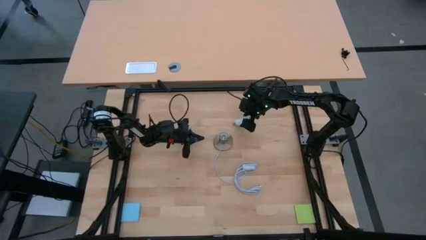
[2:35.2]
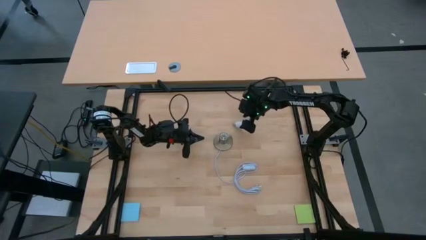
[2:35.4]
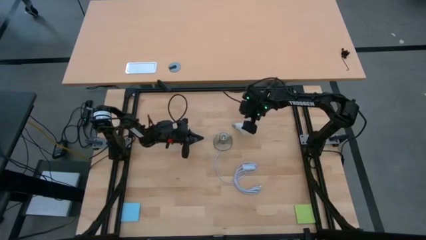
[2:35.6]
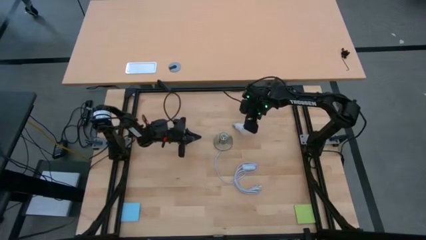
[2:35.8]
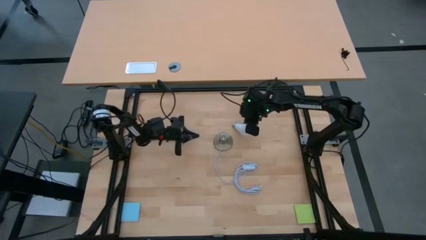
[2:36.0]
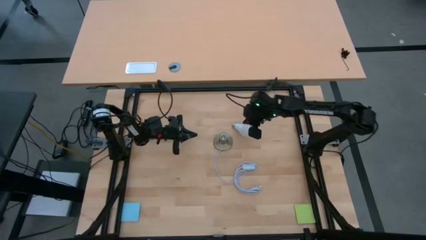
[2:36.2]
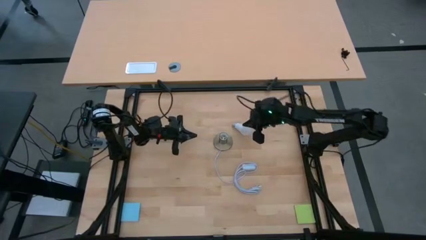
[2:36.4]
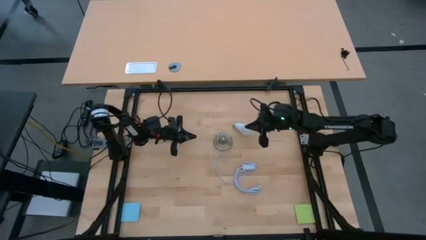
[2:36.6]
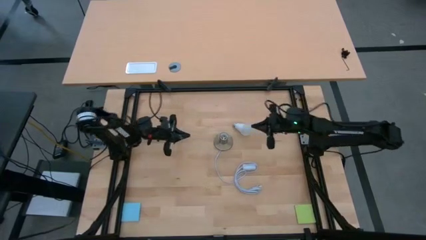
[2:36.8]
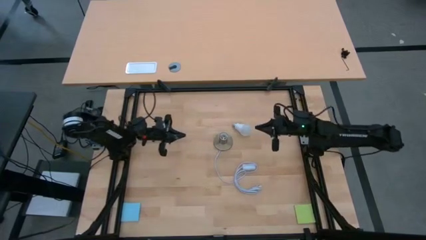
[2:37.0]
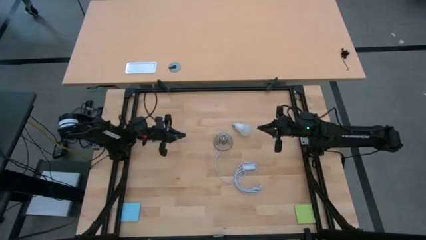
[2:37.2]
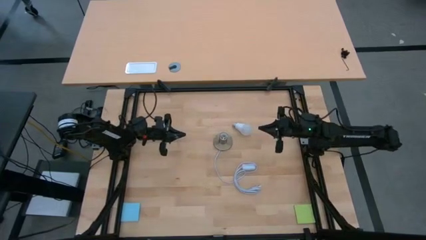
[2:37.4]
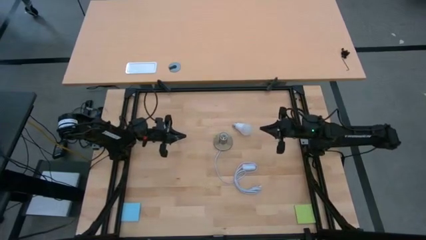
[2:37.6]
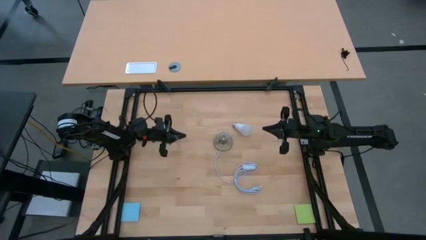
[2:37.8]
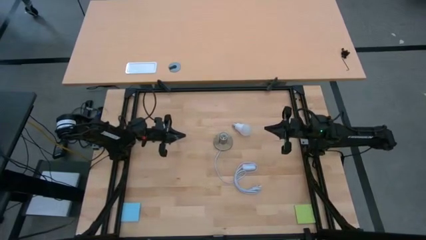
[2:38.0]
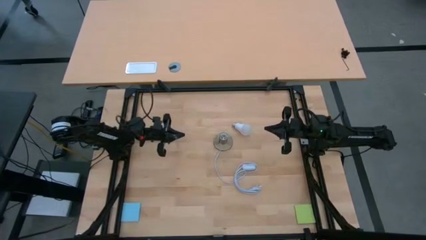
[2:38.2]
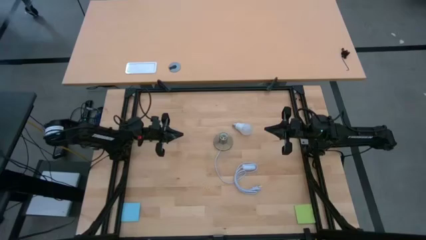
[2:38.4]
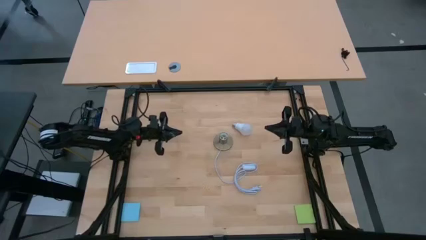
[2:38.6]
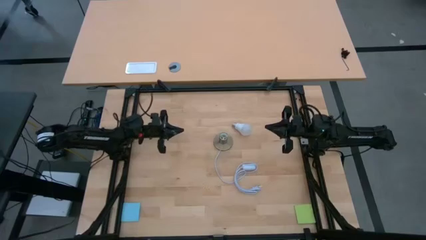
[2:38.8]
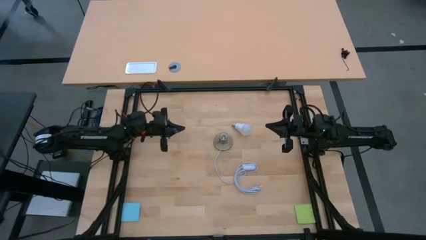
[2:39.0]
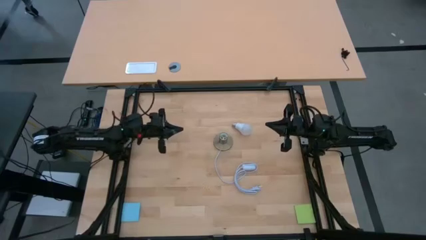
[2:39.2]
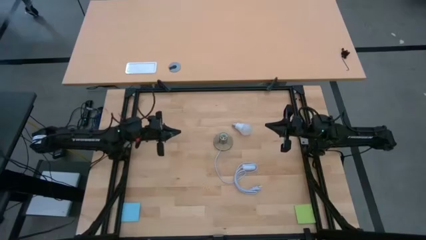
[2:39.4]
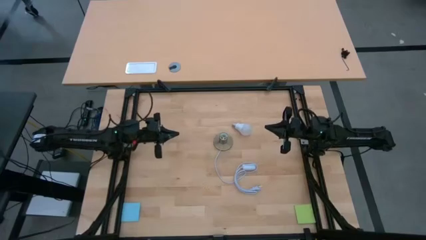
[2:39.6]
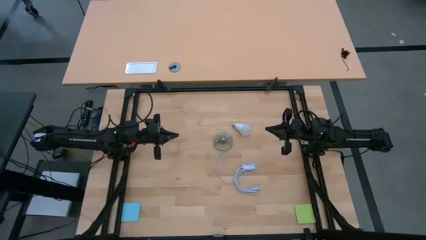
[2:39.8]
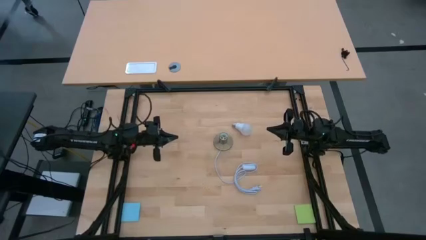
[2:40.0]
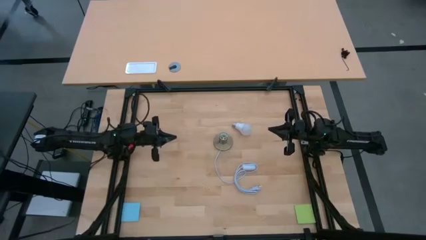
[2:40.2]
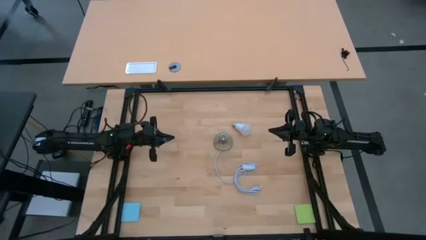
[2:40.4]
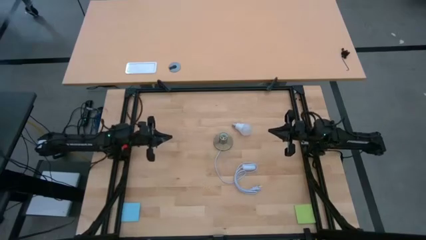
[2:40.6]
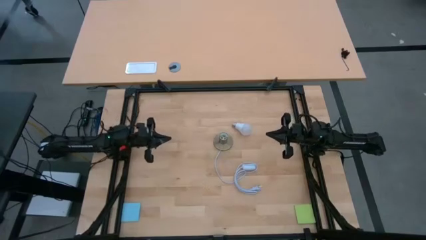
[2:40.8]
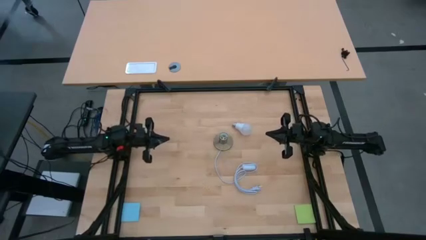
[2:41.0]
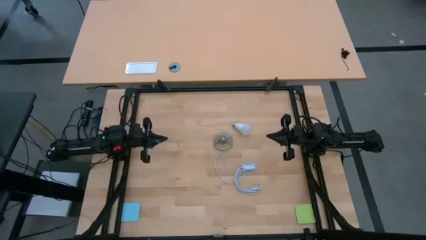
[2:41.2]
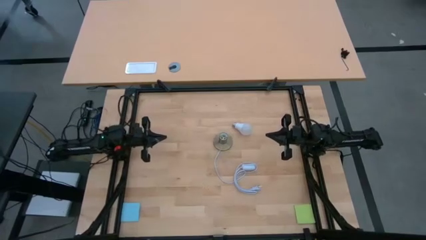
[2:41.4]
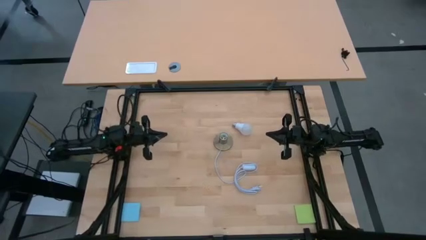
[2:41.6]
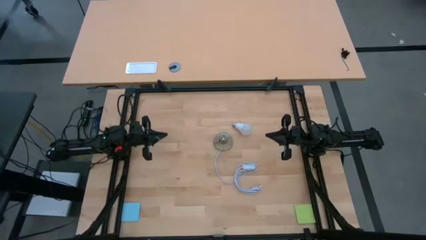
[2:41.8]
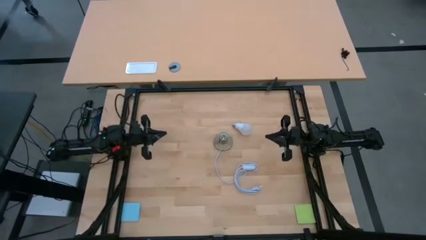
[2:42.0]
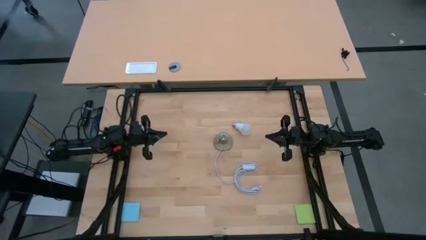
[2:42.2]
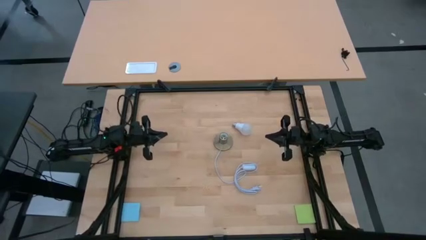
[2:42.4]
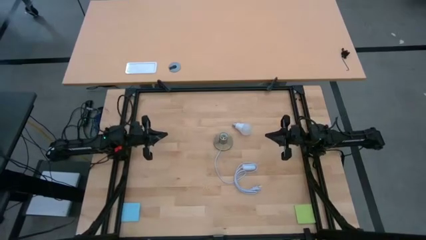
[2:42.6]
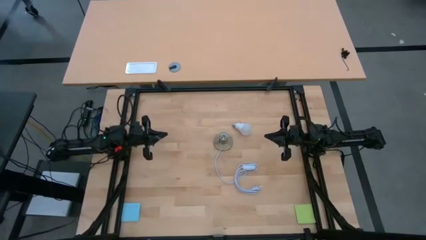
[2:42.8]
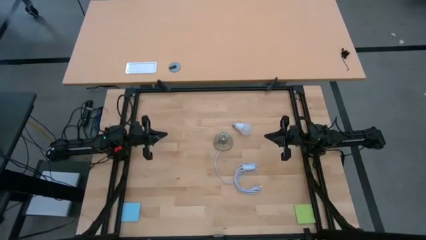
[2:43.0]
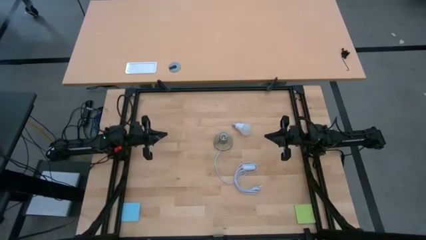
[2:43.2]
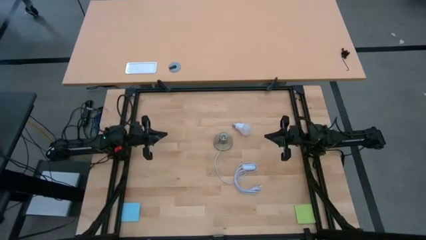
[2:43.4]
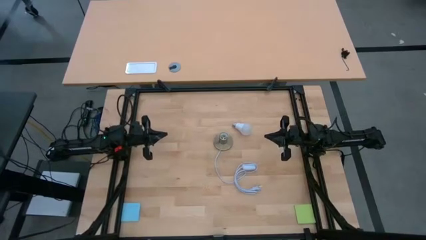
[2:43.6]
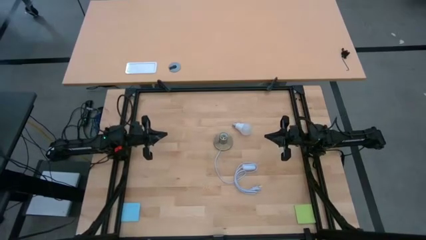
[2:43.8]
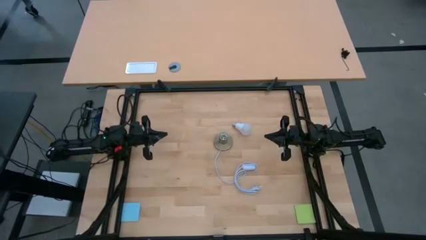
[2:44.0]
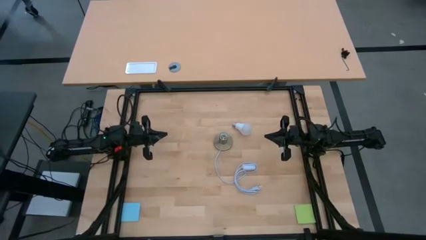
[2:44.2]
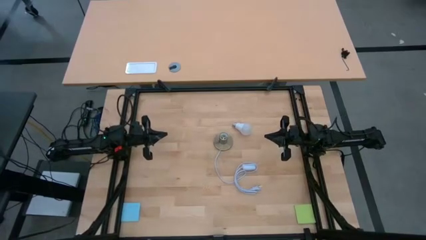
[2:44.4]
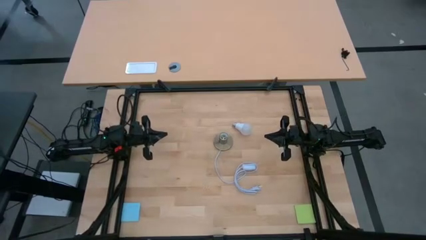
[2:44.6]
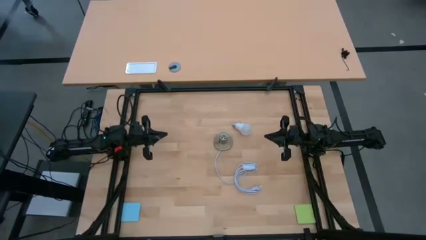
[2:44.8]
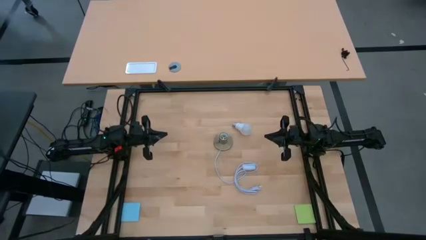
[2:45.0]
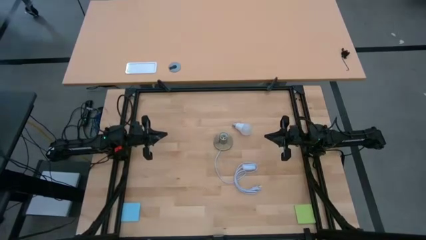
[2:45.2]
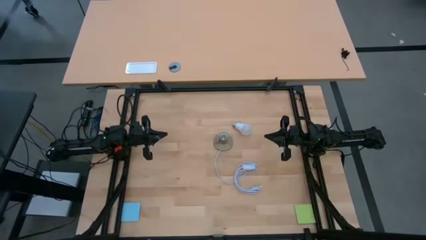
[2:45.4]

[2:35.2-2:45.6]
Task: Screw lightbulb
Return to Home Position

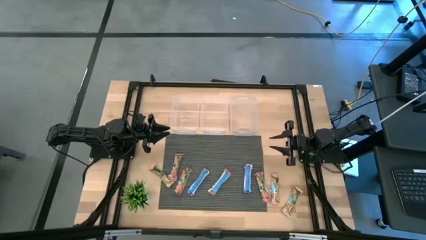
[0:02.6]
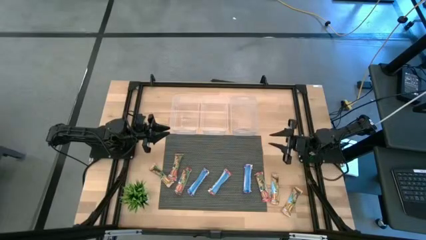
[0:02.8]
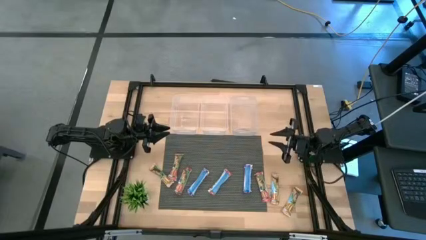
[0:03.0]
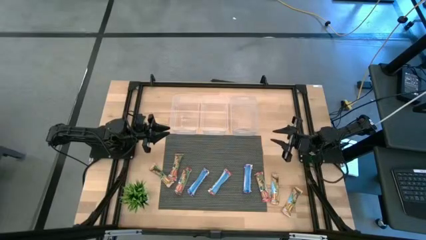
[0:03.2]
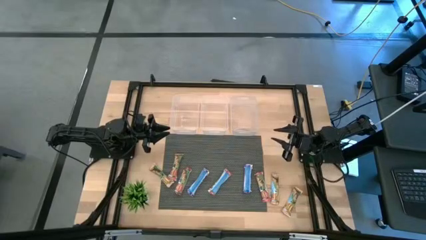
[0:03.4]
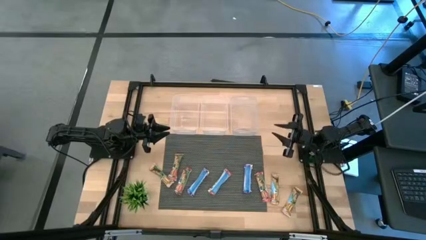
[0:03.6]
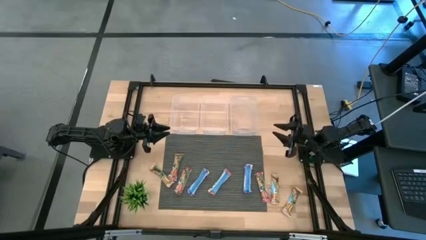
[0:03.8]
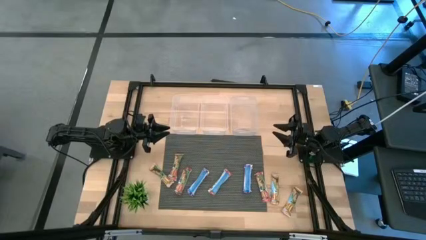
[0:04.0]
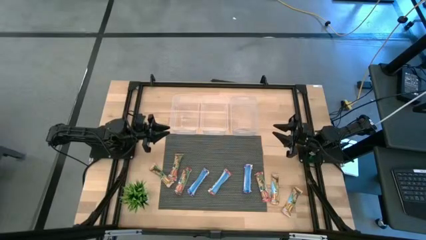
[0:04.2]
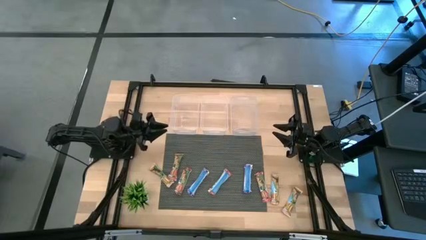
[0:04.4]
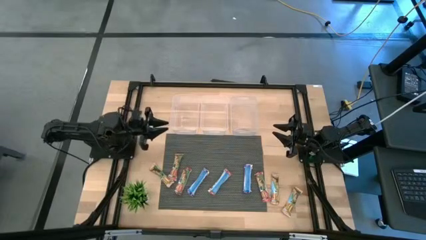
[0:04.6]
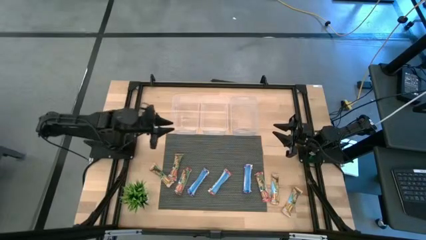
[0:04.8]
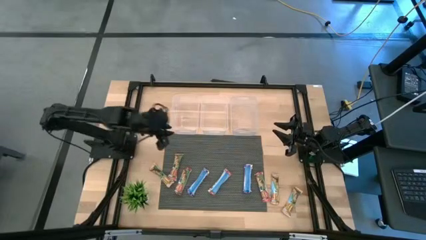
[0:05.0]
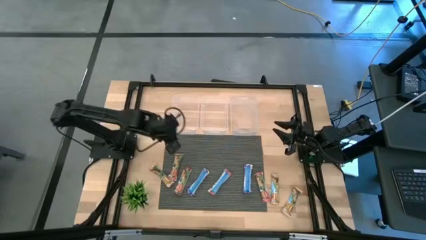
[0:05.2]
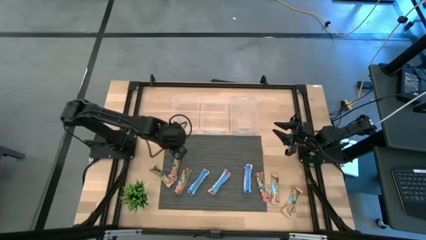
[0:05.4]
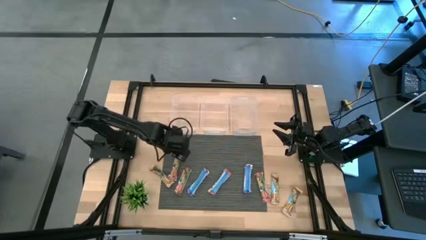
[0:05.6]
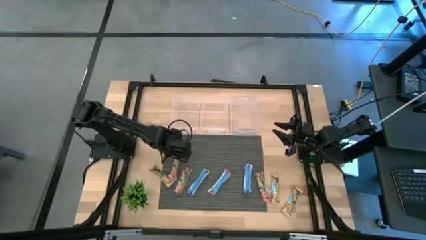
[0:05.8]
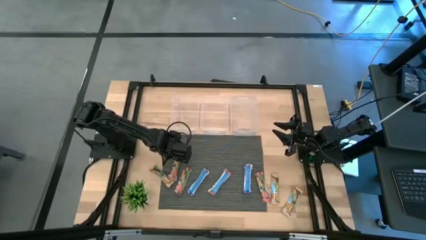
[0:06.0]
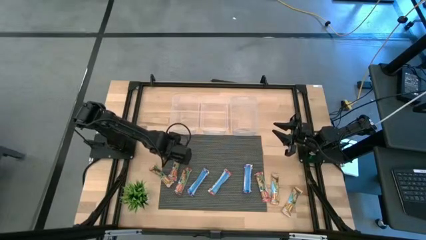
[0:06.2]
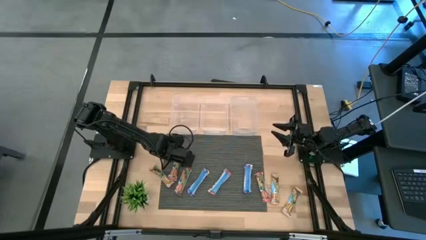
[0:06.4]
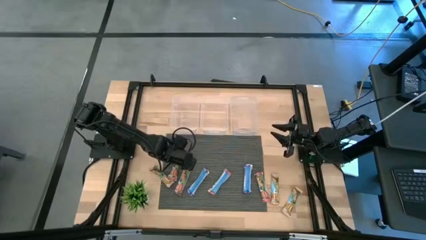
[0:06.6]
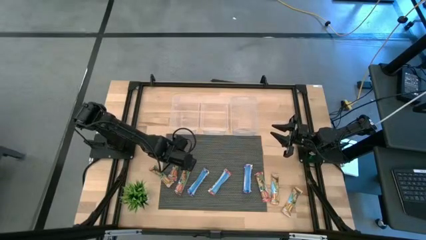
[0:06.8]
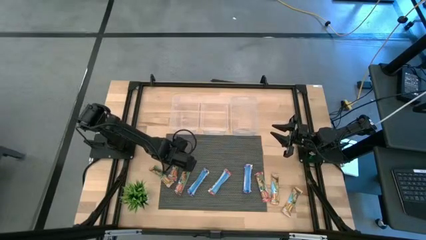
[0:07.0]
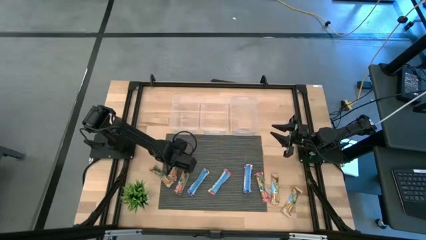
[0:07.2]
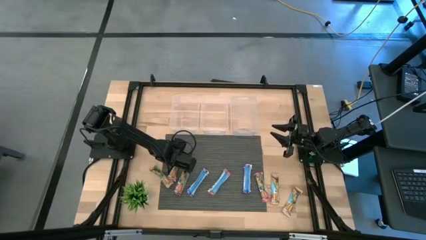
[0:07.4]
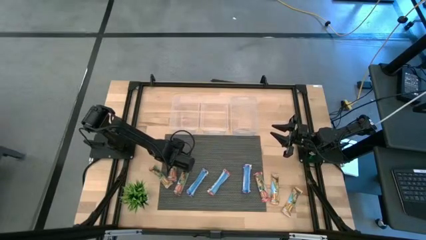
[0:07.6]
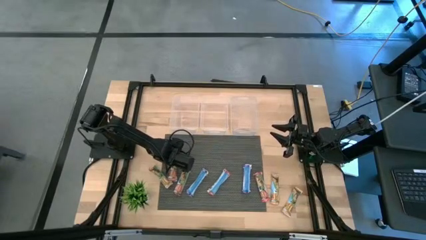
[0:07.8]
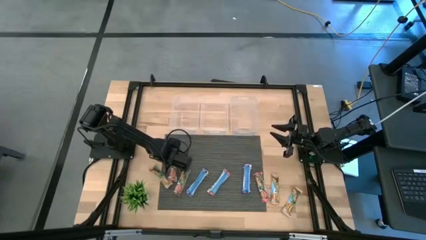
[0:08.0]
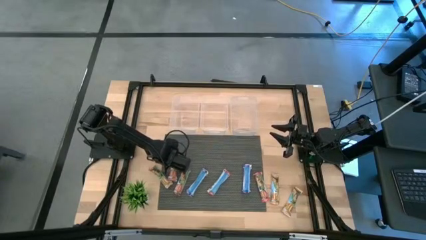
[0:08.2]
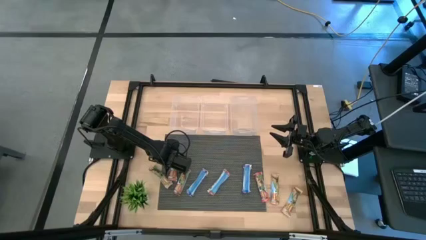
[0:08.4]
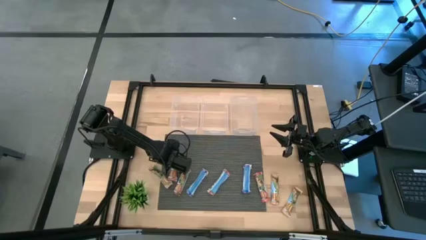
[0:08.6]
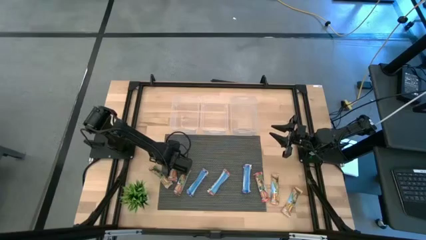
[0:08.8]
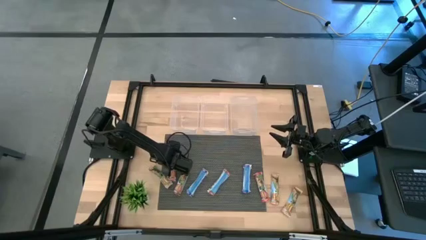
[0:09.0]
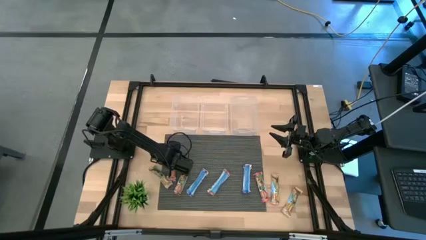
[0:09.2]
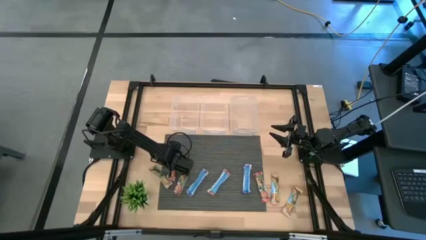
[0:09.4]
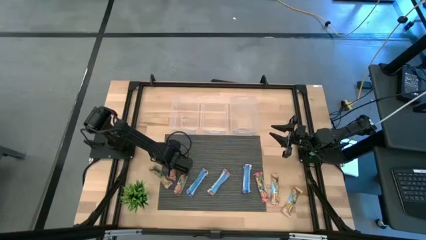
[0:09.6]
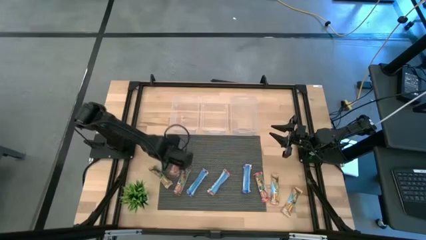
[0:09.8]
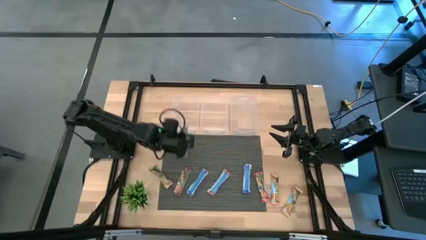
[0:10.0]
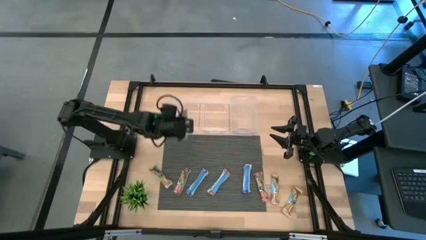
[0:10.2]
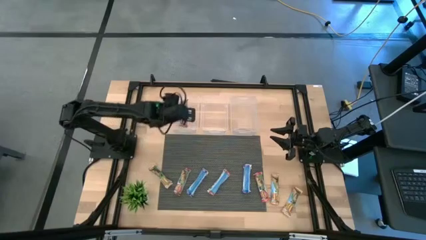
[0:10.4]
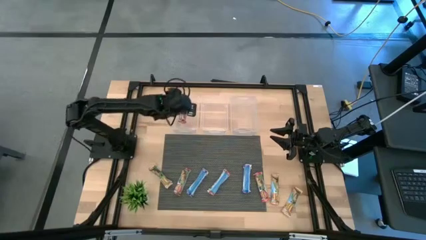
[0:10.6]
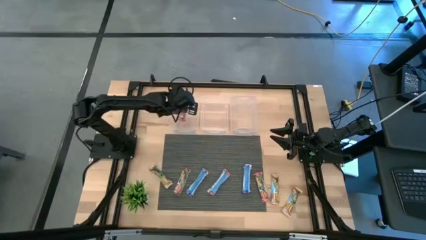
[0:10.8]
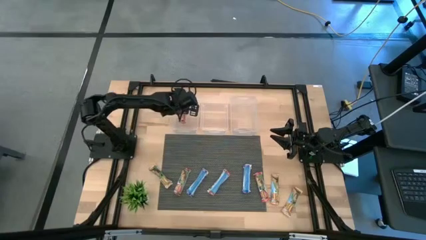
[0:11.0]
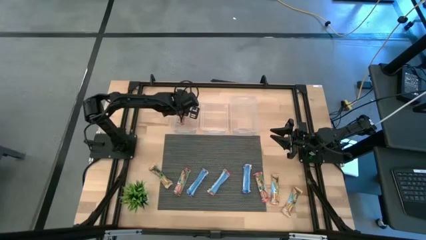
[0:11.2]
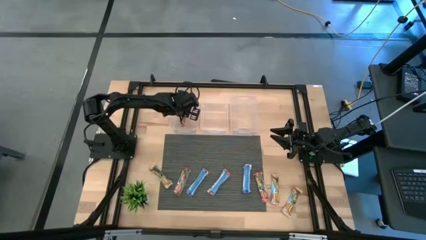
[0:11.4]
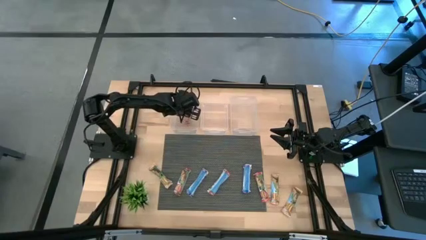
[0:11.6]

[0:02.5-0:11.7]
Task: Pick and place Granola Bars by type
Put the left red granola bar into the left transparent bin
